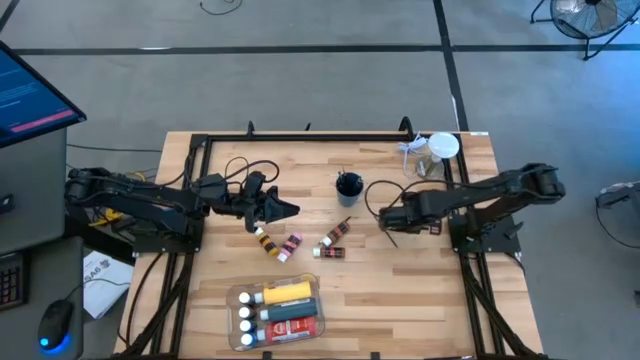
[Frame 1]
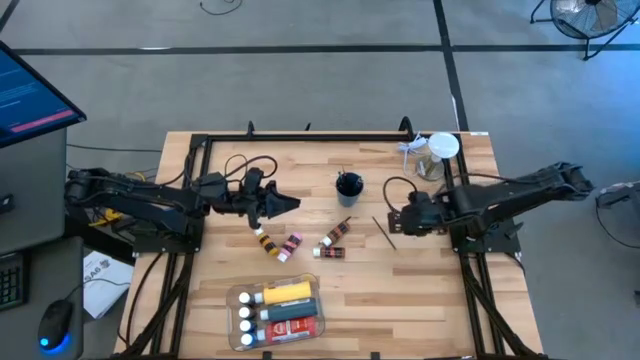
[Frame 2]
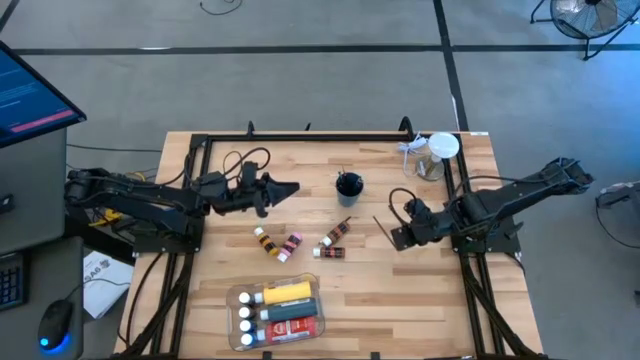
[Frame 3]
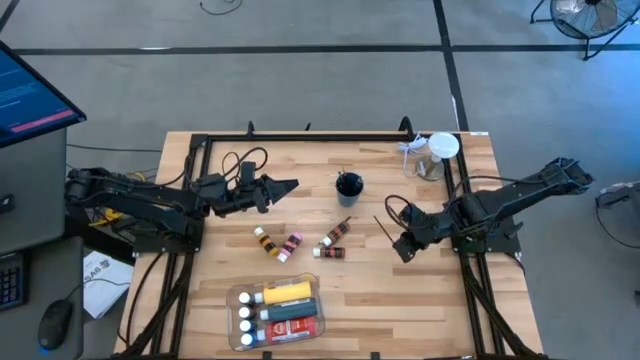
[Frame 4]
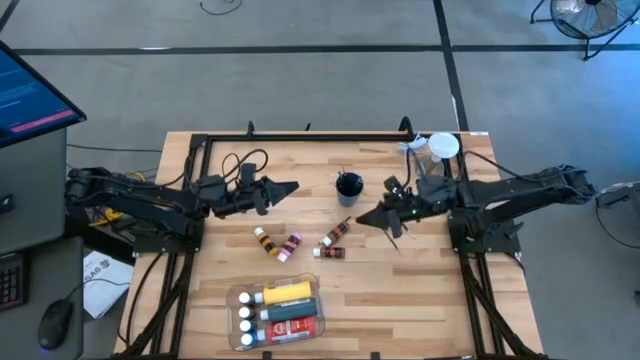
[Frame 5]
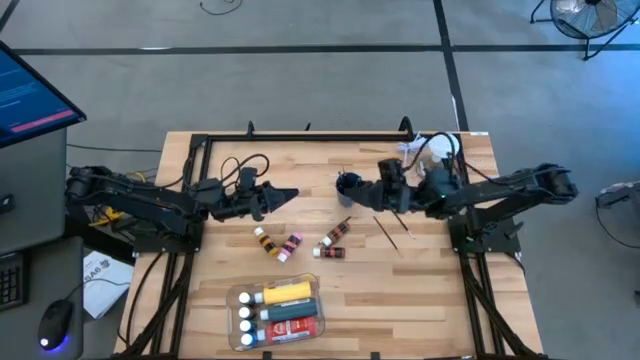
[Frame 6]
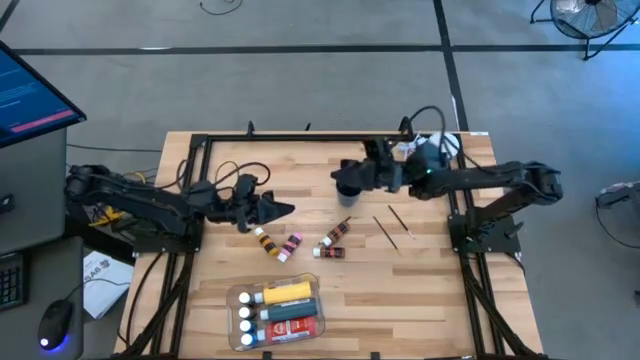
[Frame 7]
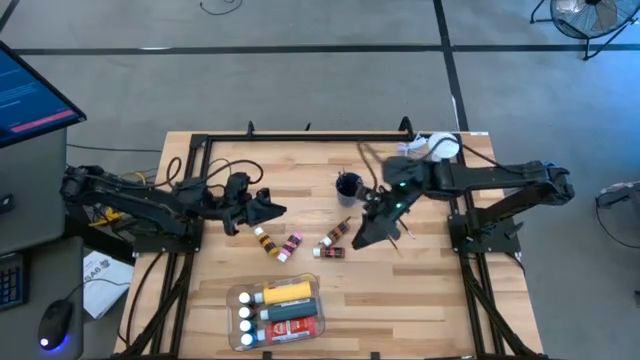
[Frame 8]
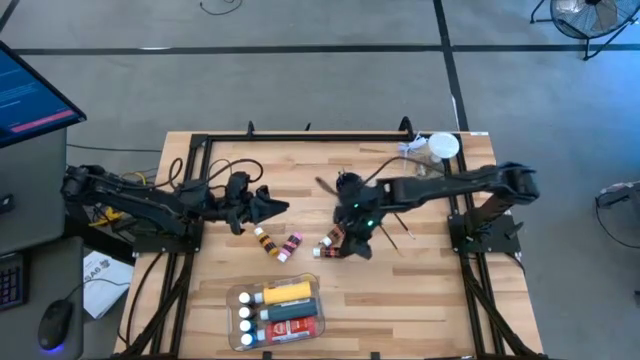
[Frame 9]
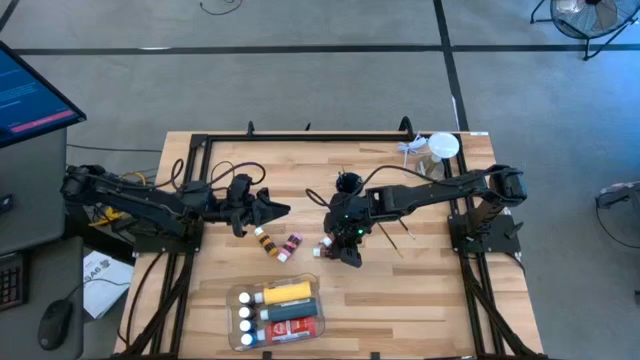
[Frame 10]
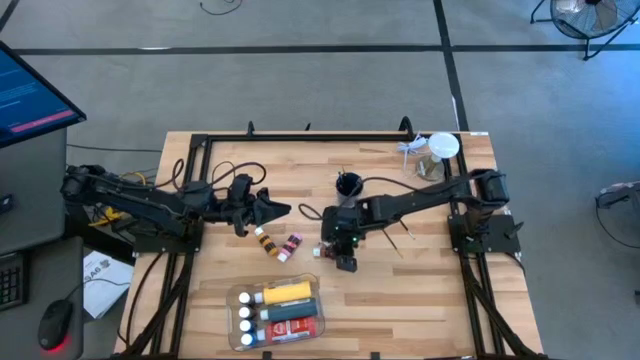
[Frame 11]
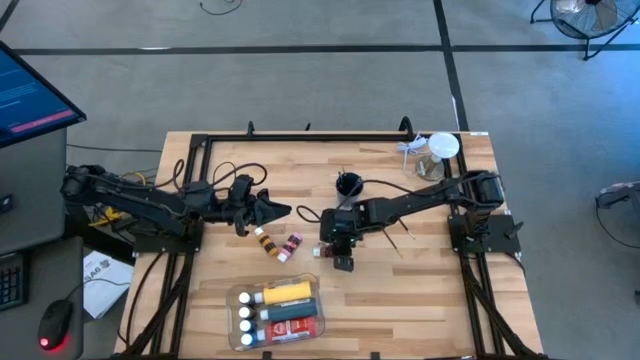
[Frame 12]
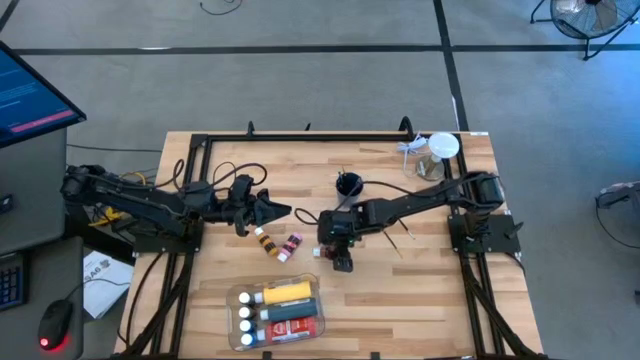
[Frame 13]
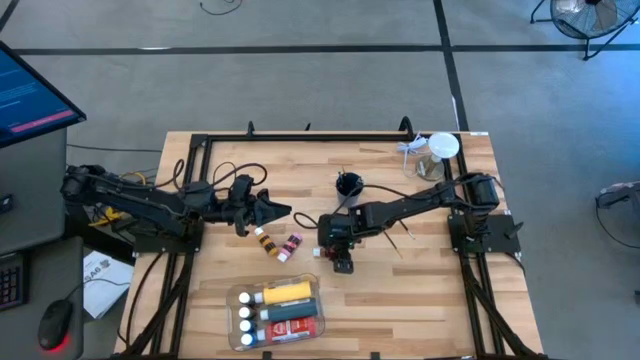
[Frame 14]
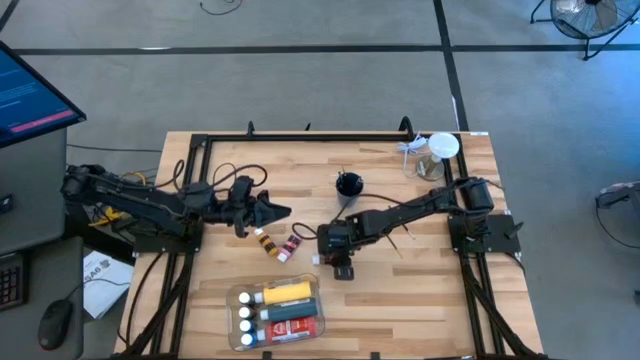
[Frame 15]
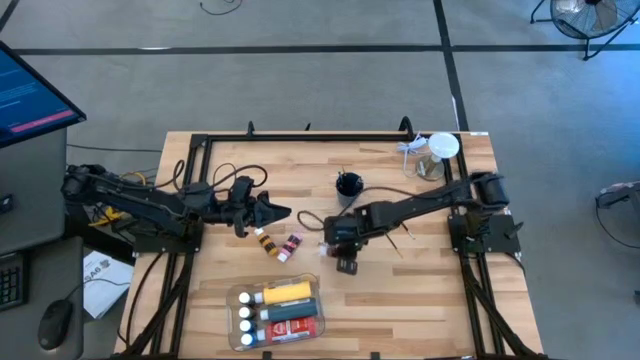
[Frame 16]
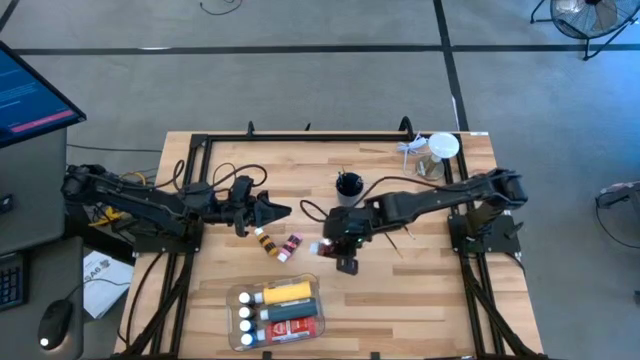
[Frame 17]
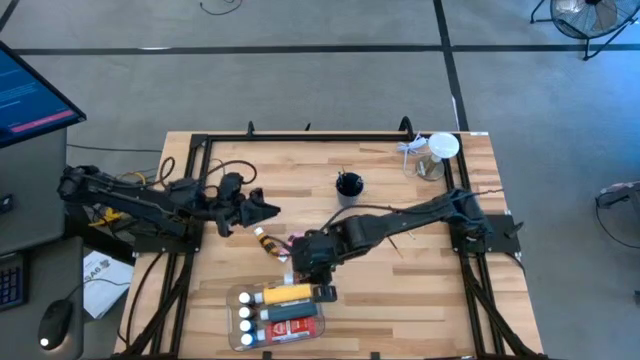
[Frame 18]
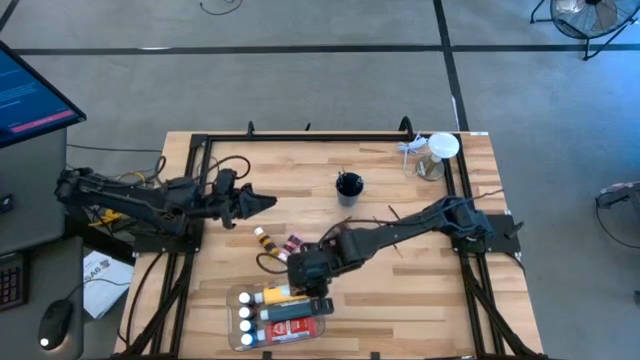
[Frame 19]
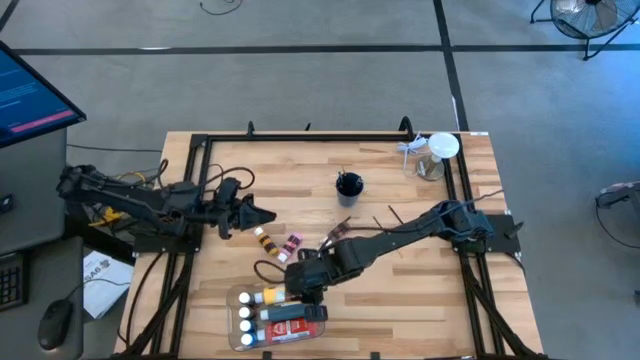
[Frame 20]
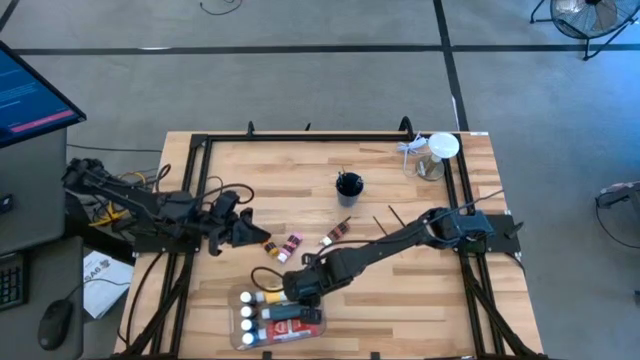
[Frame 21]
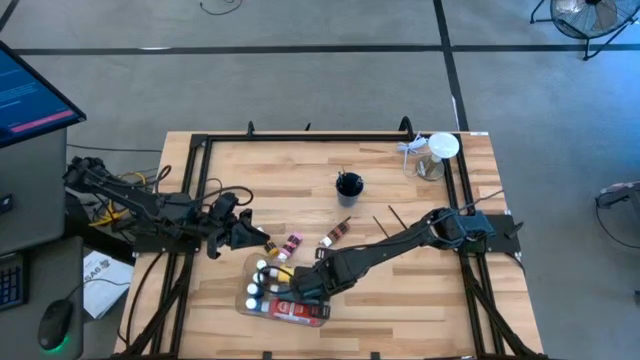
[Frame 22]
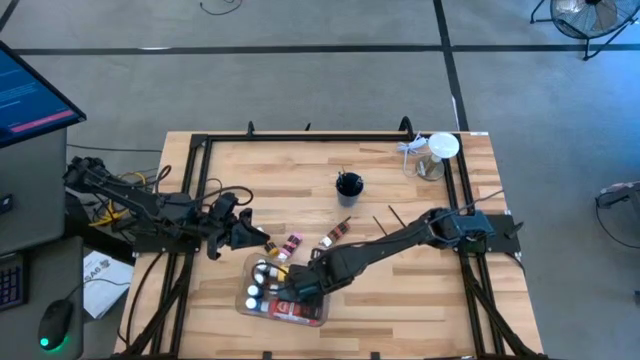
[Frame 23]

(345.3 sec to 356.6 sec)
Task: Pick & Place Paint Supplies
Put the bottom small brown paint bottle into the transparent bin

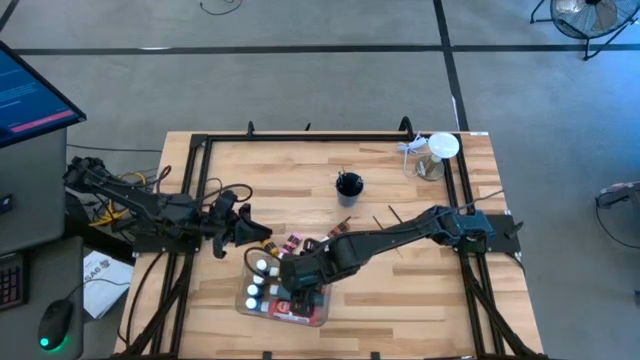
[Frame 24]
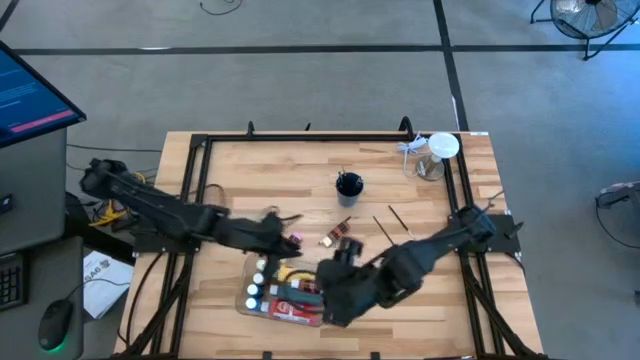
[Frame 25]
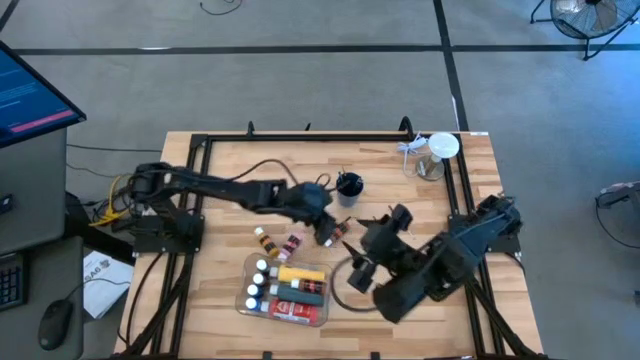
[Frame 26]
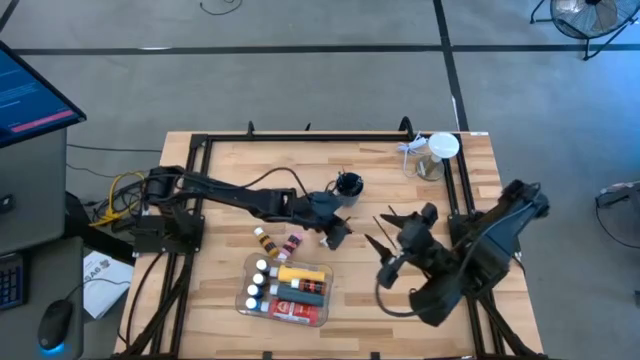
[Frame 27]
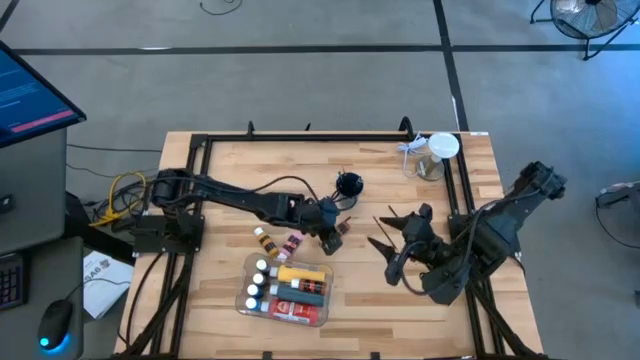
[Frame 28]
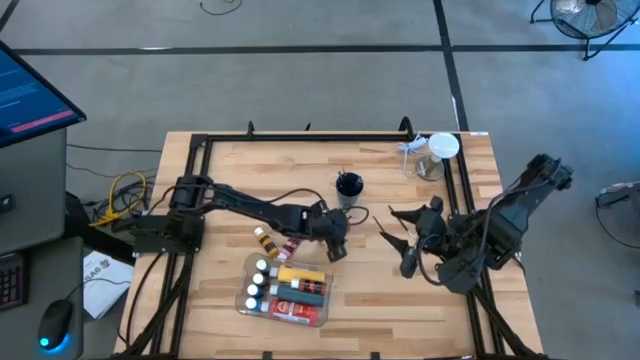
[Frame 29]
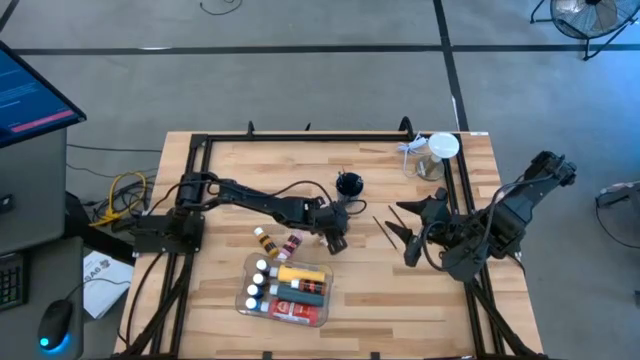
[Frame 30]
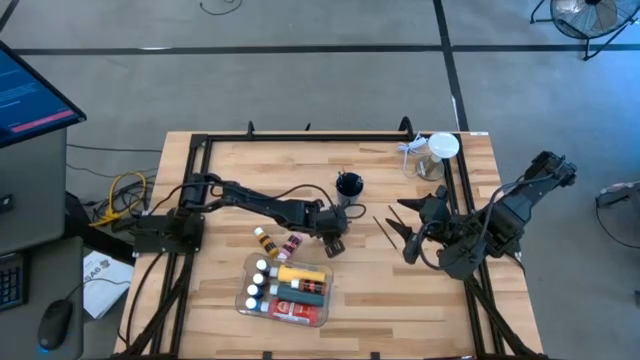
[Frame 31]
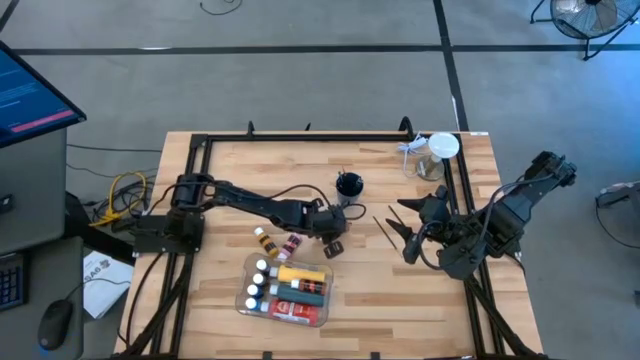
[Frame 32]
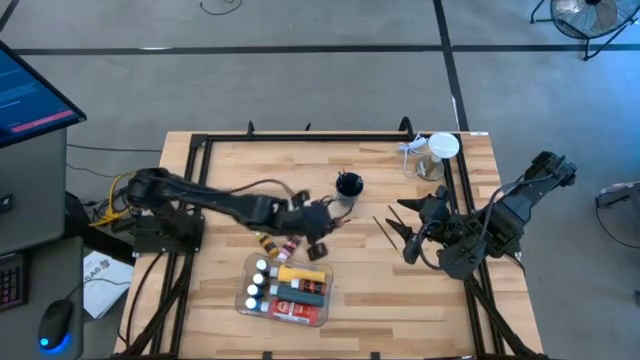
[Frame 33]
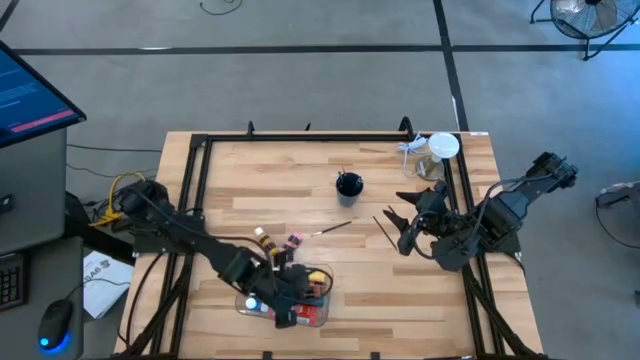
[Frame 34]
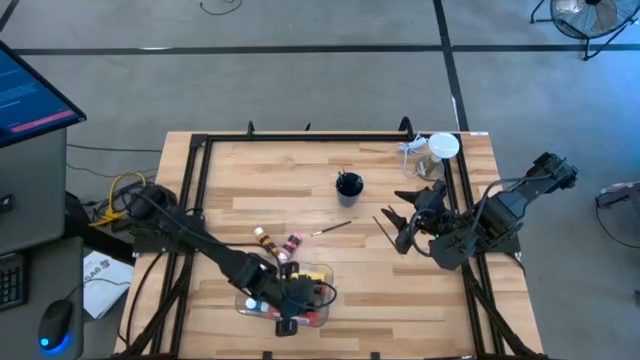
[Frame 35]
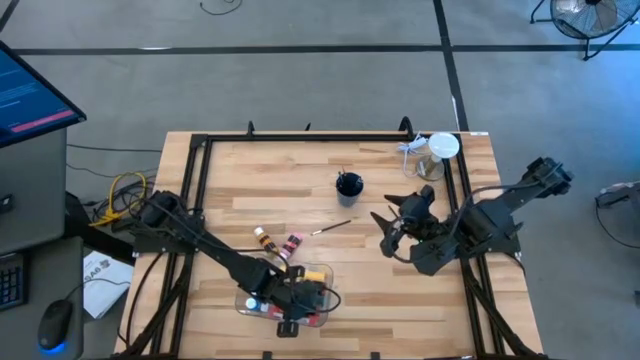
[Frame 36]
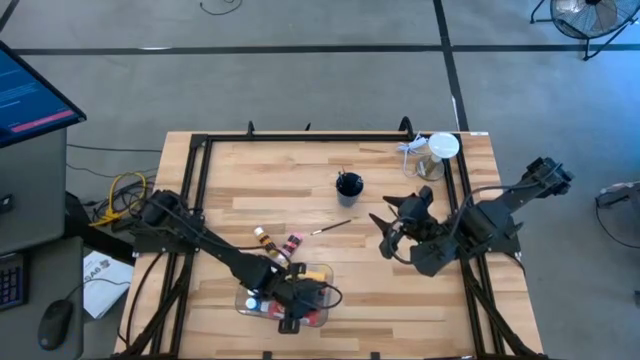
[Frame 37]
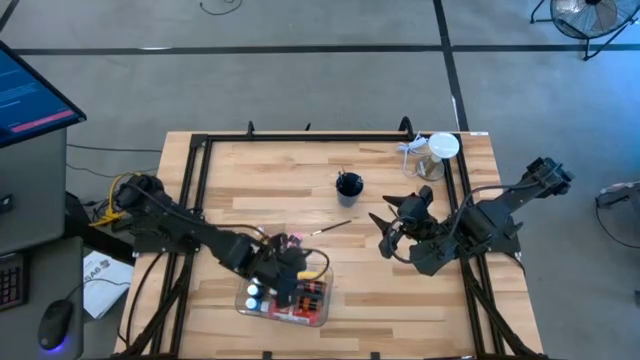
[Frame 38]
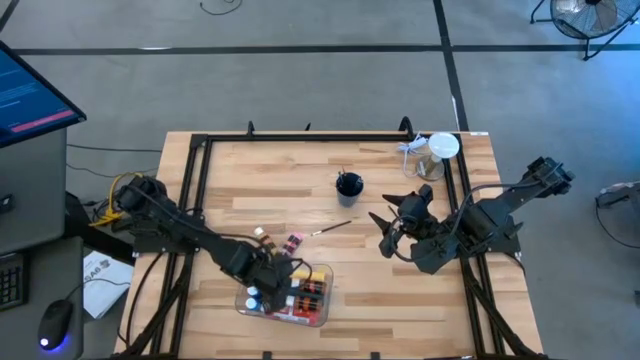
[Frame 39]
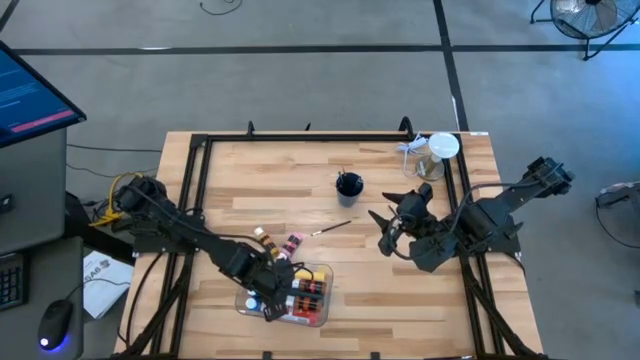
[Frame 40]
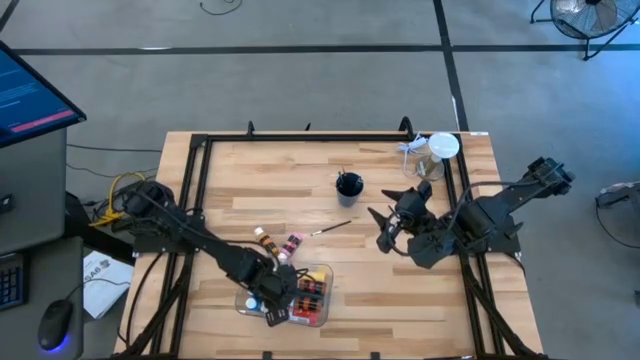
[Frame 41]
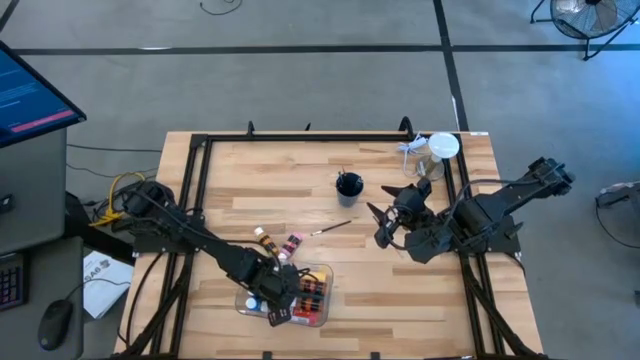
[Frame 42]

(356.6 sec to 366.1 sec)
Put the small brown paint bottle into the transparent bin
